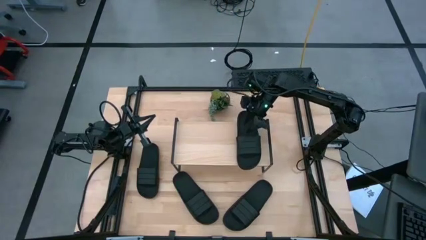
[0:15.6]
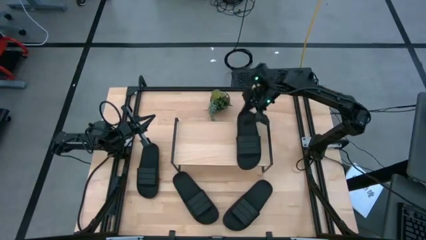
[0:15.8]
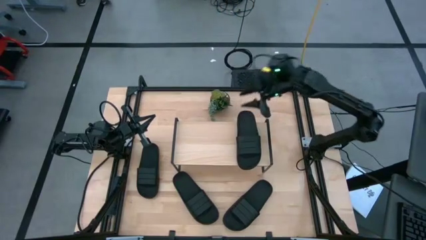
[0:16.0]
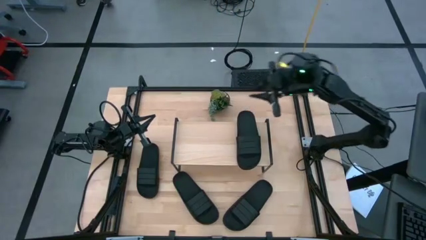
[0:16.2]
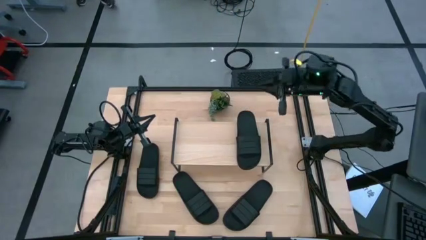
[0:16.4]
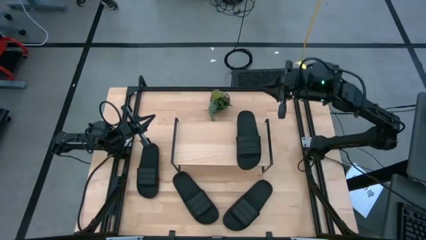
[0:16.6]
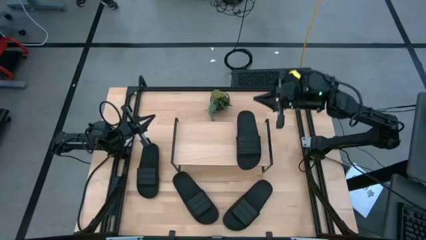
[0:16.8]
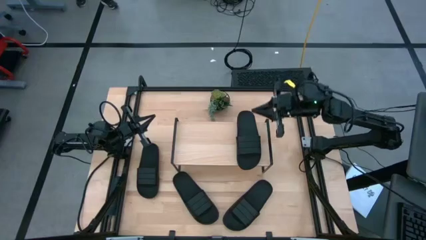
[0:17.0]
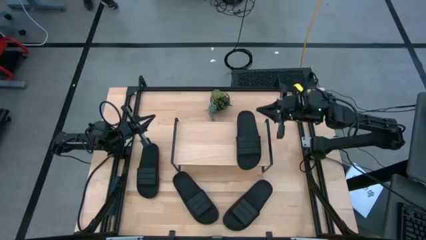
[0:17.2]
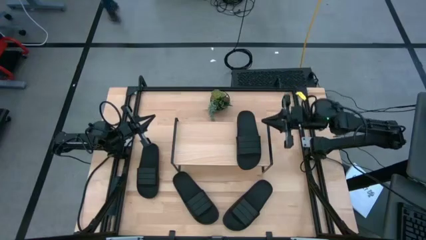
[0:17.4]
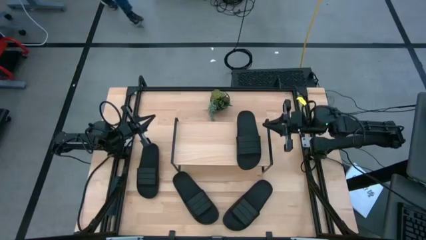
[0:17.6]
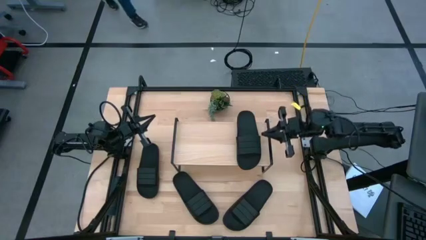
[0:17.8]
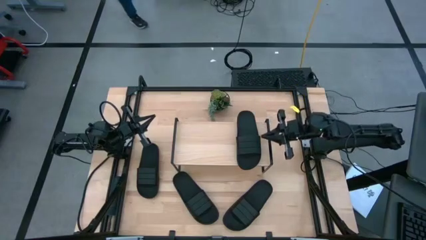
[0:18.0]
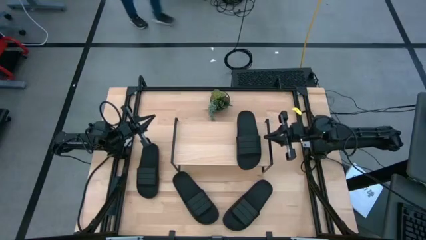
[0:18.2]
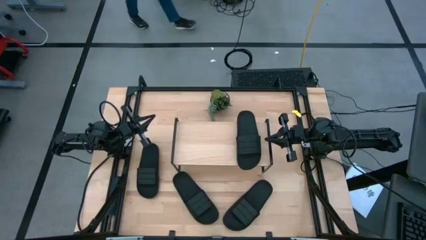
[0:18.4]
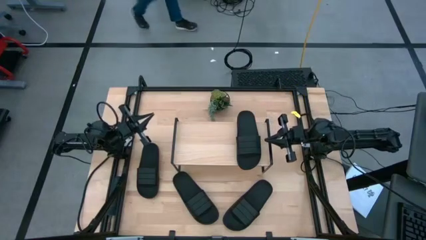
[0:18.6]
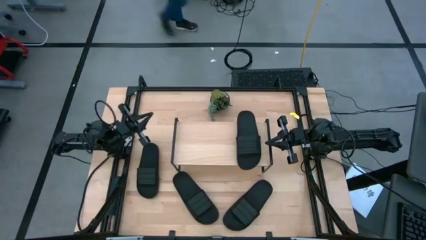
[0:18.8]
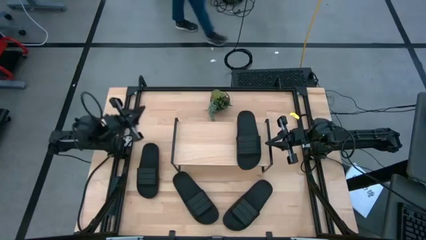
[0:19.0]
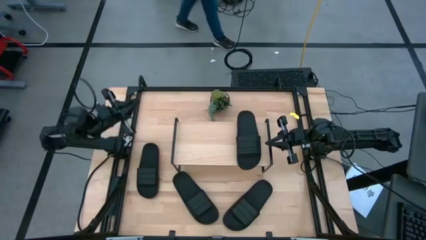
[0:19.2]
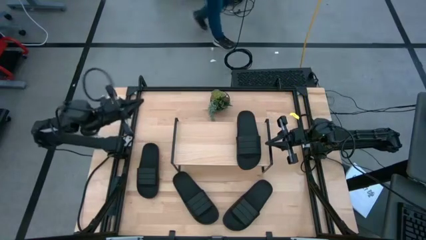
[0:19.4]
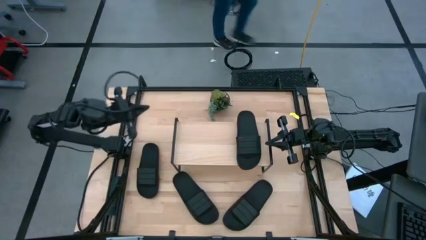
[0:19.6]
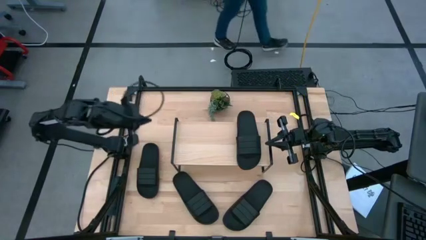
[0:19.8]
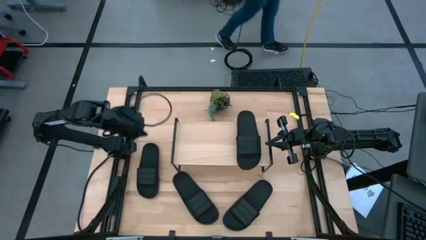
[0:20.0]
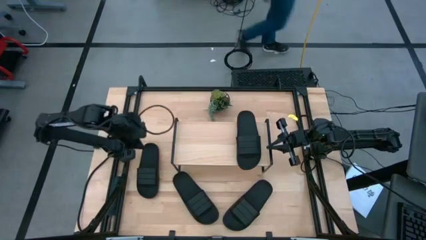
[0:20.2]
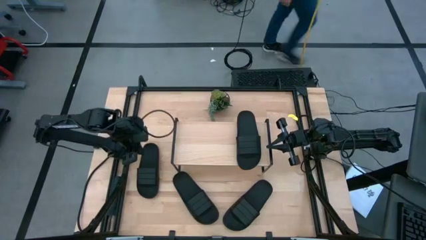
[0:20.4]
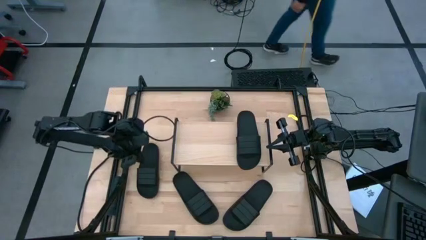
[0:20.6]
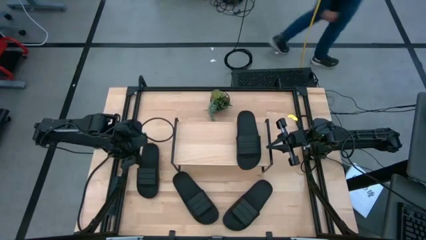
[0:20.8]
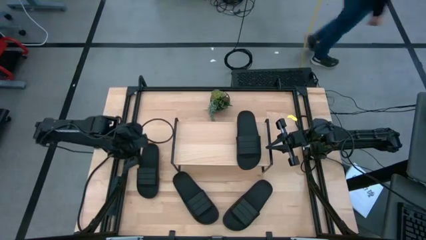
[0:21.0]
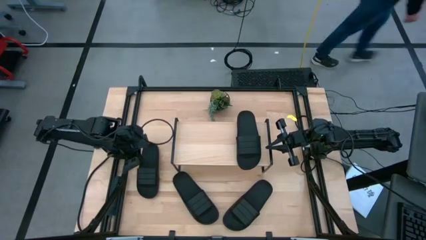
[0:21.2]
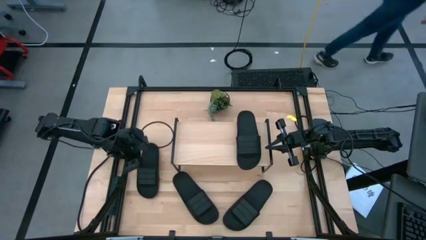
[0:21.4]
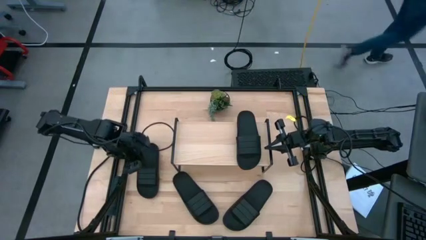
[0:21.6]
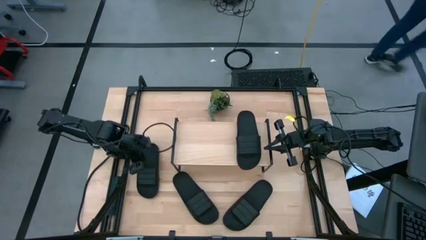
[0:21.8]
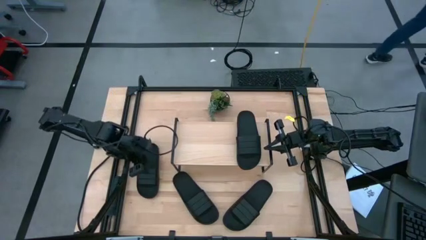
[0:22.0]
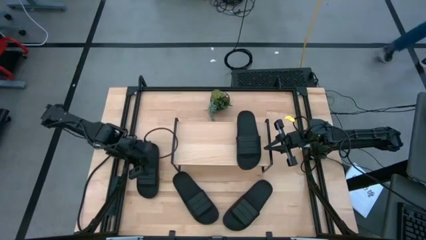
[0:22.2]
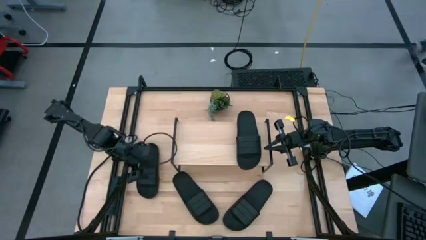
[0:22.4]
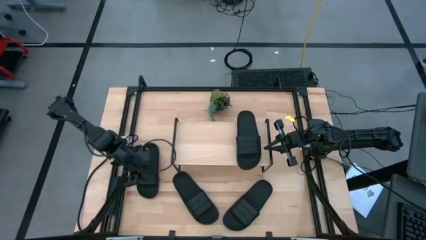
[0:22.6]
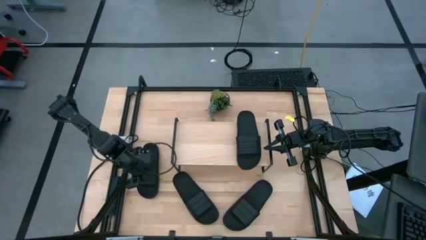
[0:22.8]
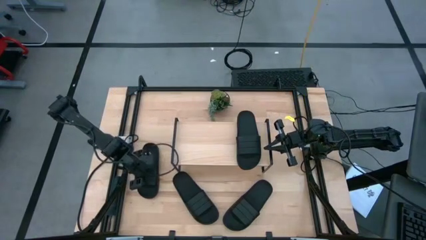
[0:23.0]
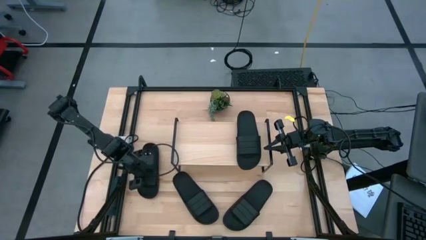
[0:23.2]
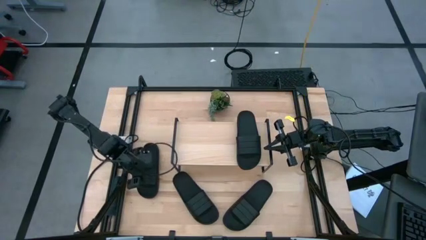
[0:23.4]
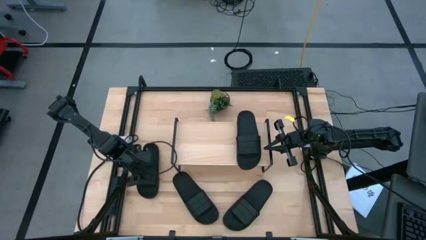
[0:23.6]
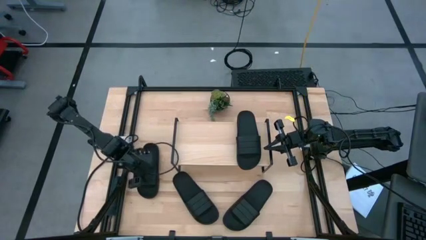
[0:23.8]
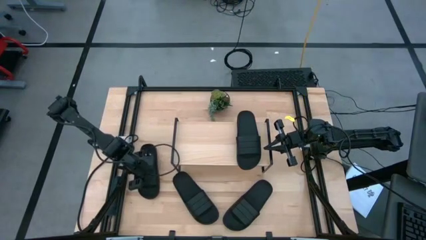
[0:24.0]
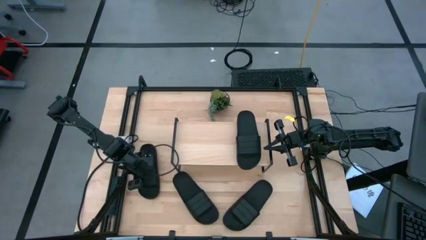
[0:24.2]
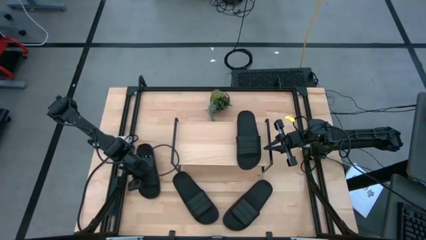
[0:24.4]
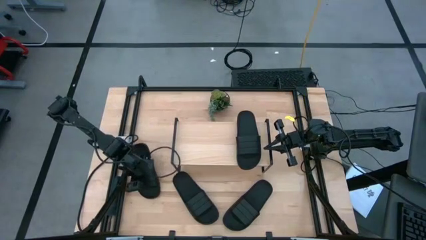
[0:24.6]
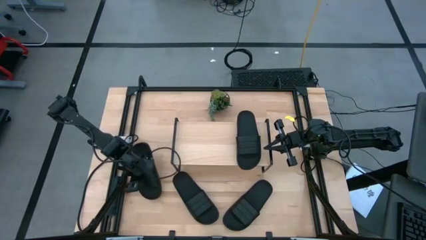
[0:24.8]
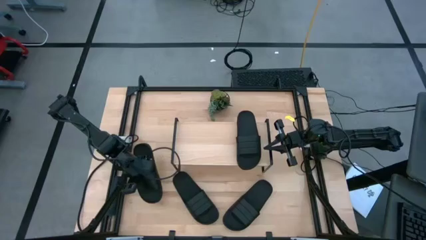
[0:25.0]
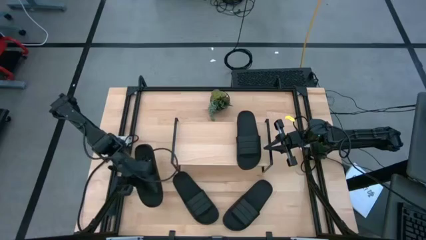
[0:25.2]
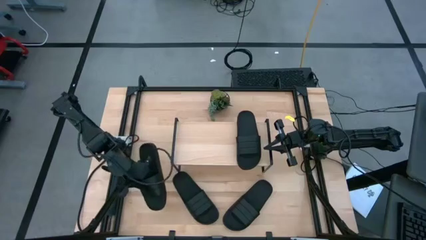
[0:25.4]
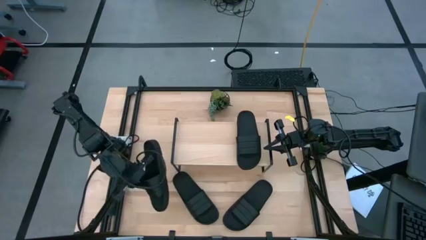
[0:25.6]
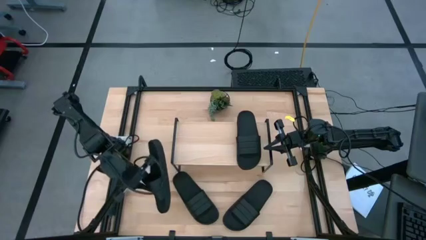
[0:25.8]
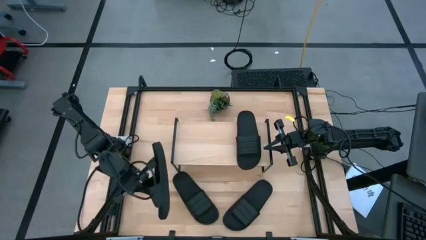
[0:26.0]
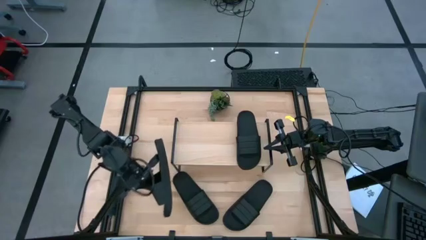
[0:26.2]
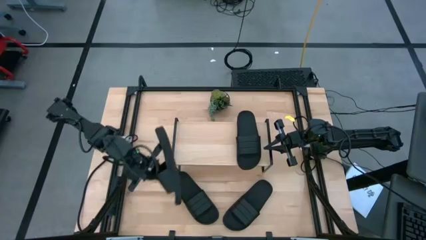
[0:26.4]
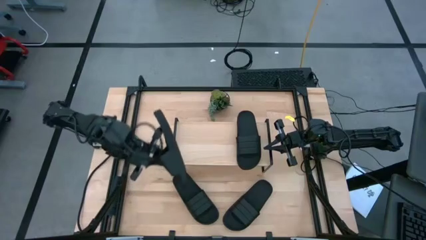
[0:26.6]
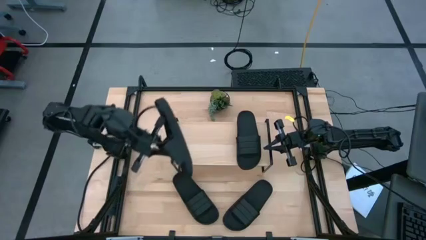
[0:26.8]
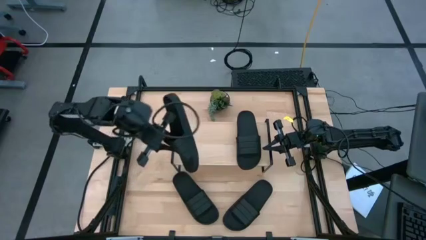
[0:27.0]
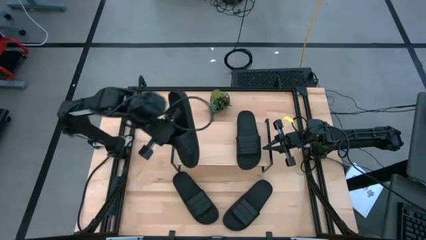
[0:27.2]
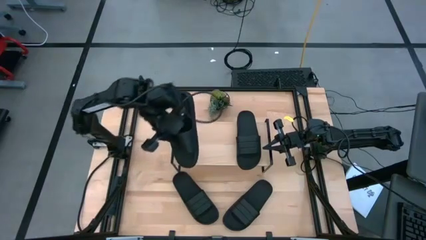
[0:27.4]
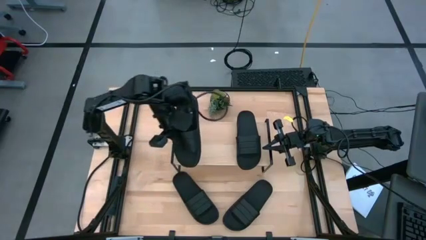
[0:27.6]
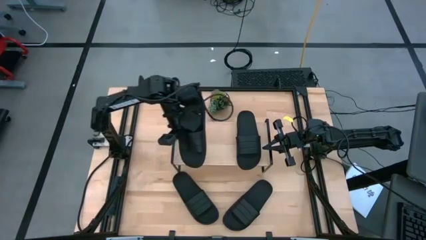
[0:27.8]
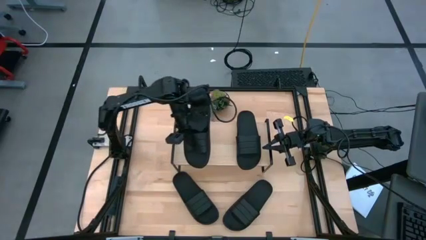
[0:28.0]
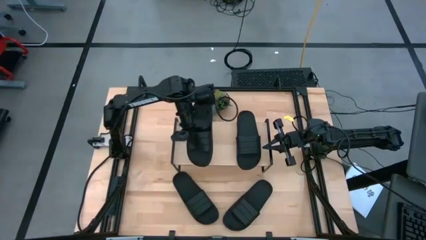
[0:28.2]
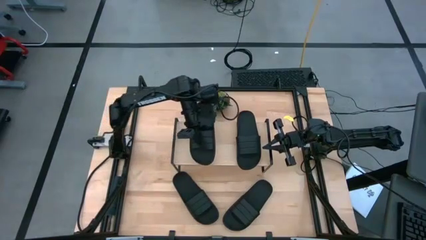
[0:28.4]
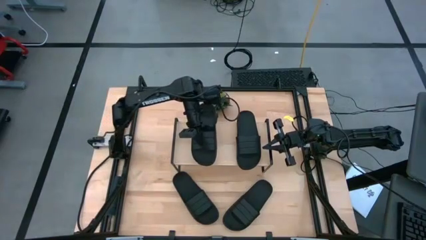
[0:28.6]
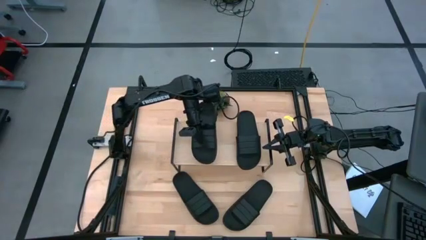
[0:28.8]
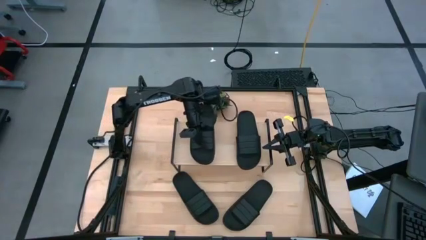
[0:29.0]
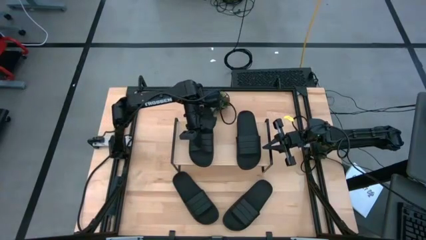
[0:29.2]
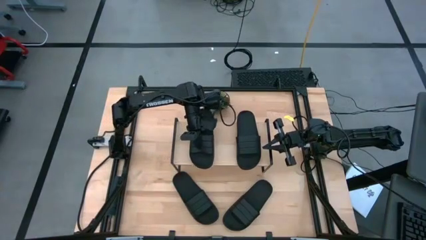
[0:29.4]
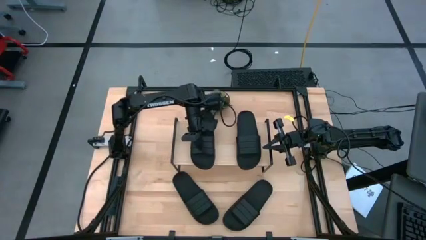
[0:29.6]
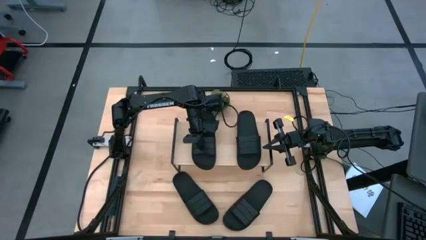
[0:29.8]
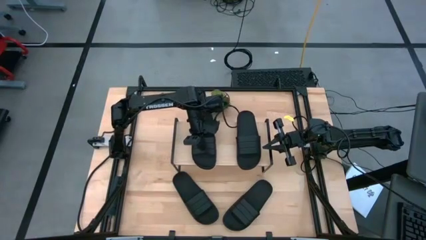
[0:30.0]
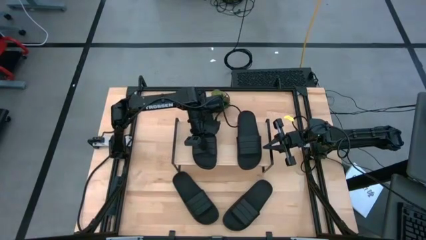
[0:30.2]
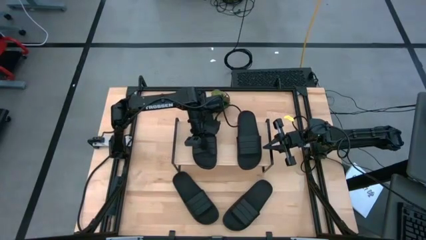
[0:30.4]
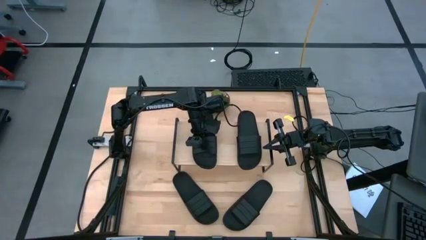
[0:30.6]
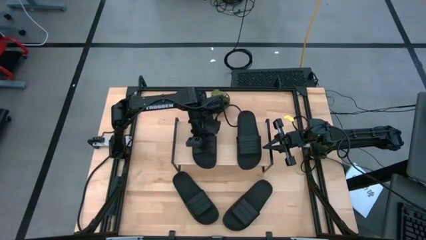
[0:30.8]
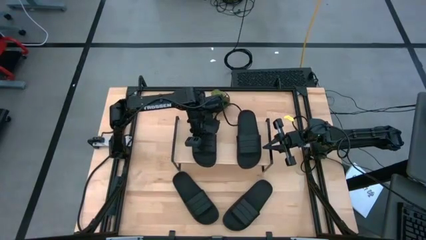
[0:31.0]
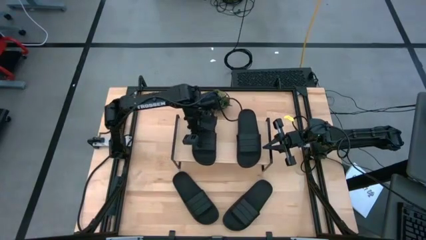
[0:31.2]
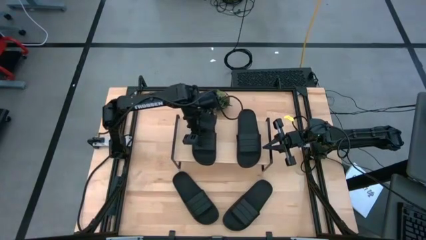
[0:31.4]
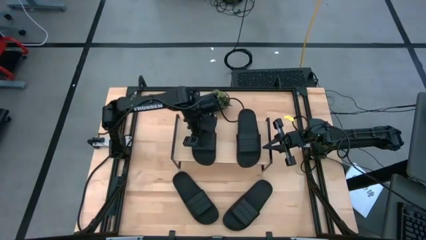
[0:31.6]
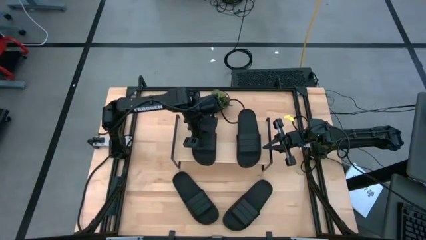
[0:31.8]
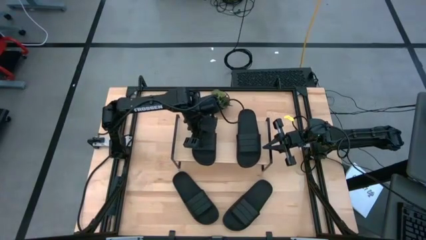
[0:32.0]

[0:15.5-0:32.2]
Task: Pick and place slides into the shelf
Put the black slide on the shelf
